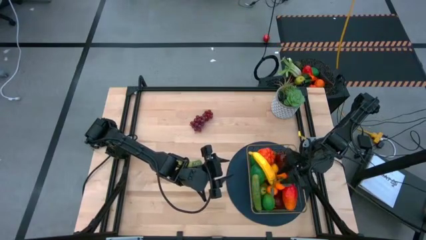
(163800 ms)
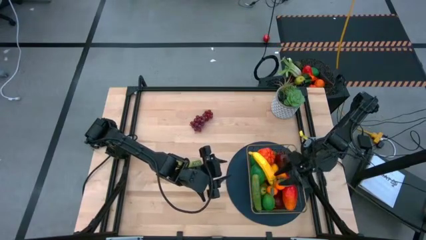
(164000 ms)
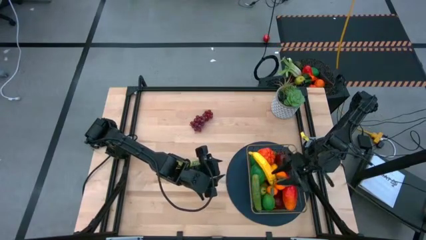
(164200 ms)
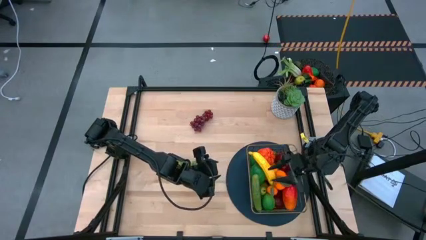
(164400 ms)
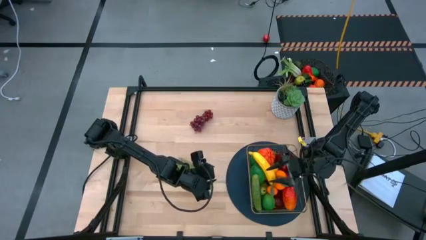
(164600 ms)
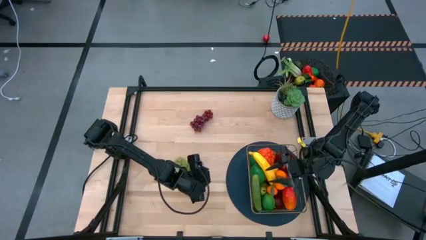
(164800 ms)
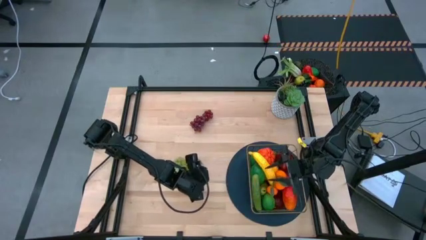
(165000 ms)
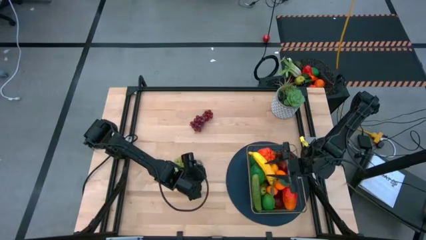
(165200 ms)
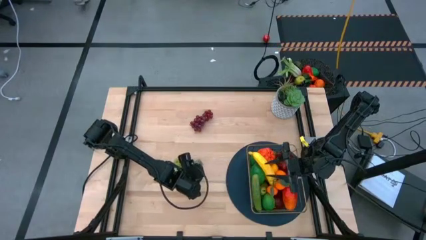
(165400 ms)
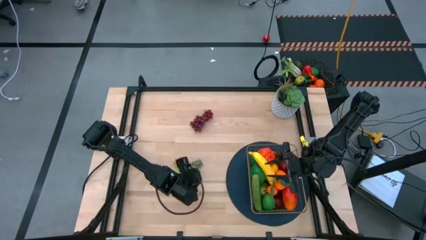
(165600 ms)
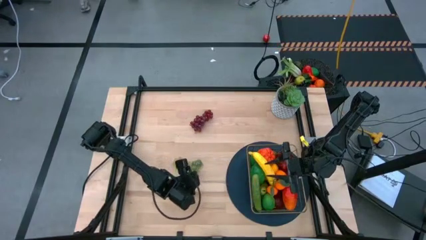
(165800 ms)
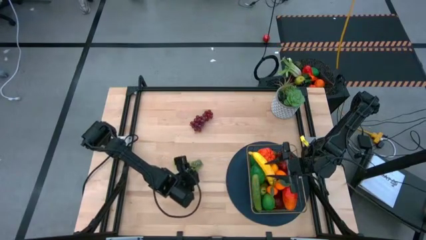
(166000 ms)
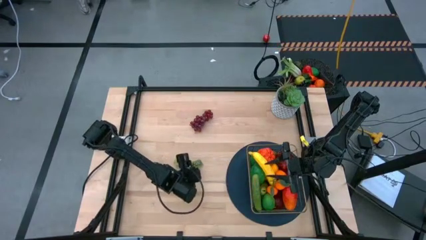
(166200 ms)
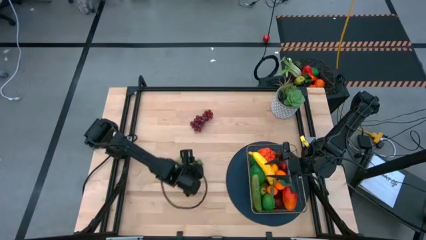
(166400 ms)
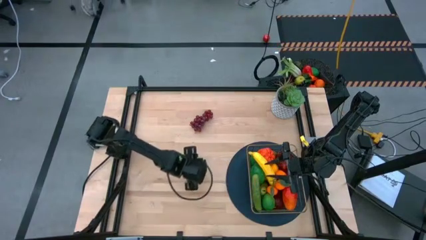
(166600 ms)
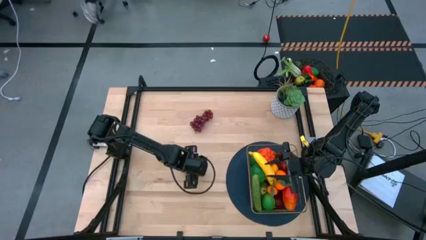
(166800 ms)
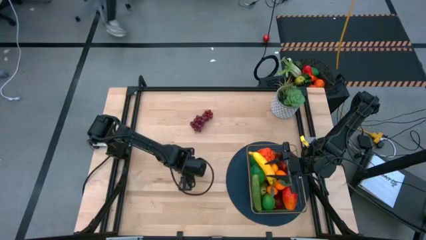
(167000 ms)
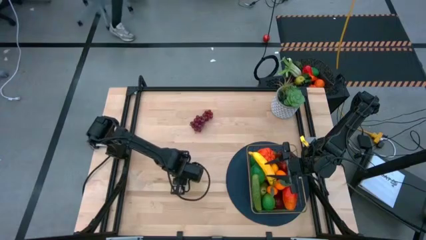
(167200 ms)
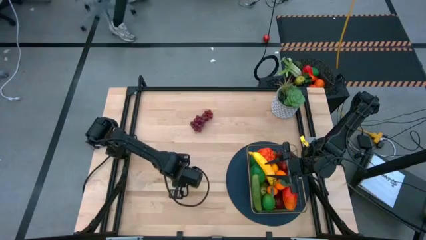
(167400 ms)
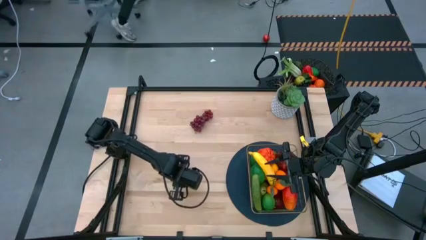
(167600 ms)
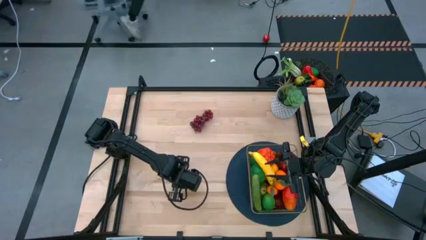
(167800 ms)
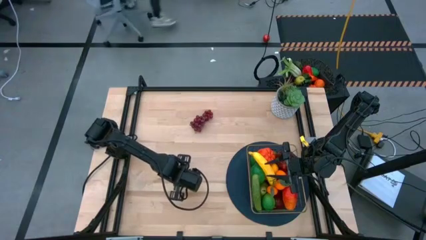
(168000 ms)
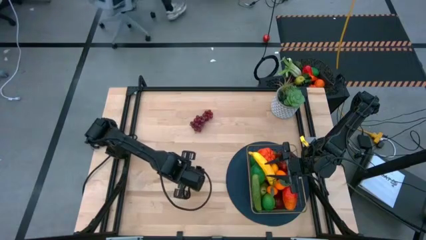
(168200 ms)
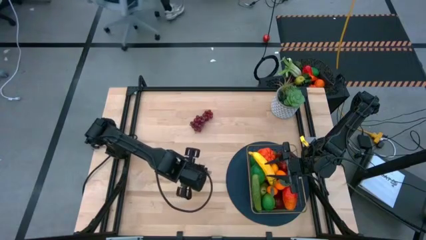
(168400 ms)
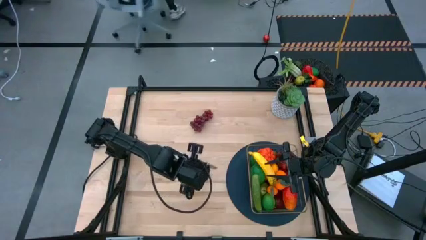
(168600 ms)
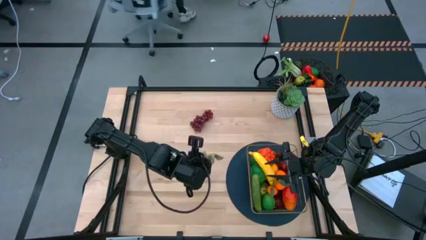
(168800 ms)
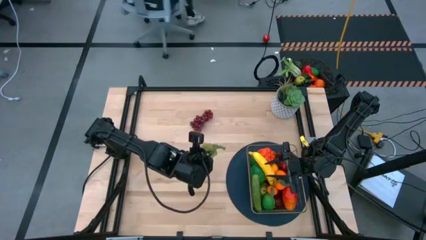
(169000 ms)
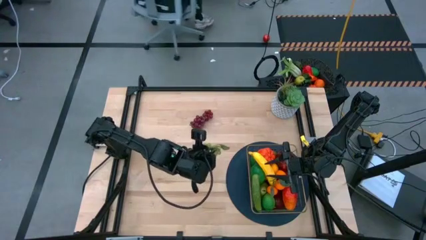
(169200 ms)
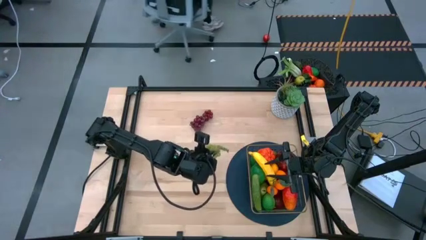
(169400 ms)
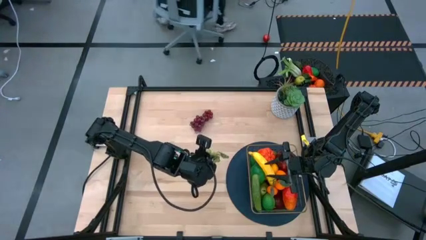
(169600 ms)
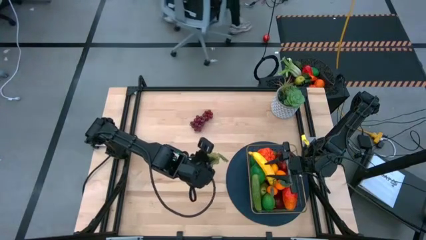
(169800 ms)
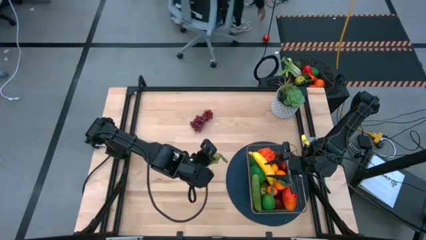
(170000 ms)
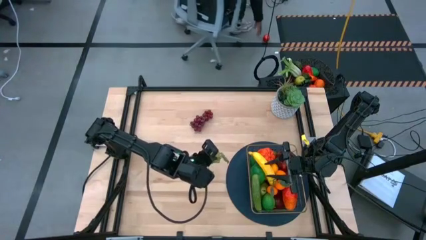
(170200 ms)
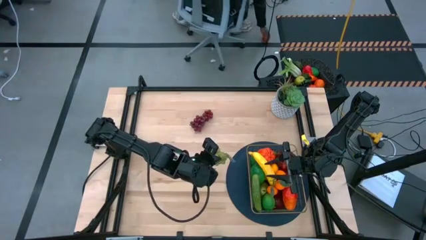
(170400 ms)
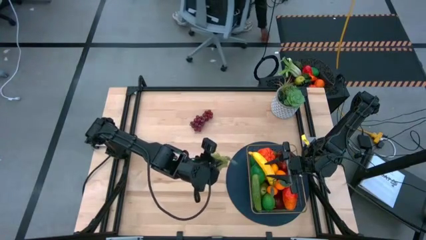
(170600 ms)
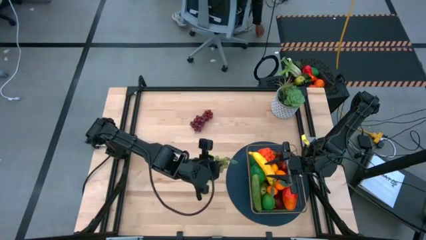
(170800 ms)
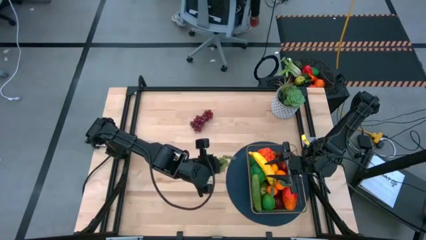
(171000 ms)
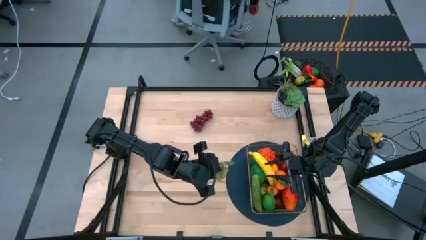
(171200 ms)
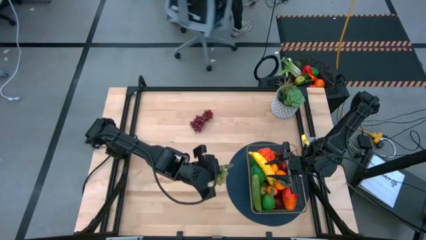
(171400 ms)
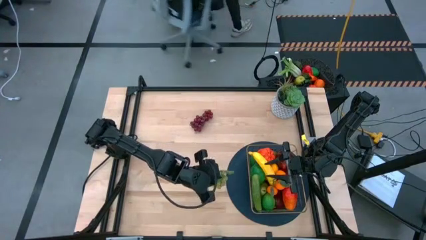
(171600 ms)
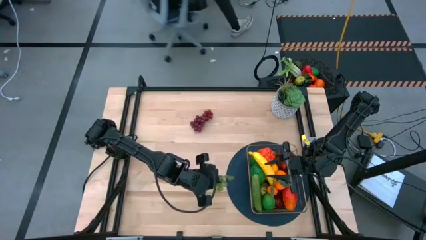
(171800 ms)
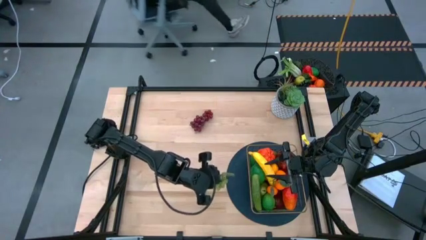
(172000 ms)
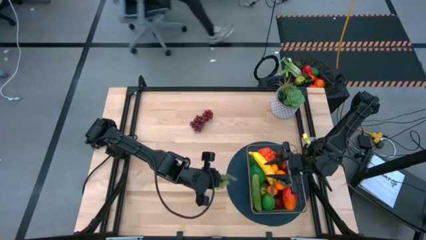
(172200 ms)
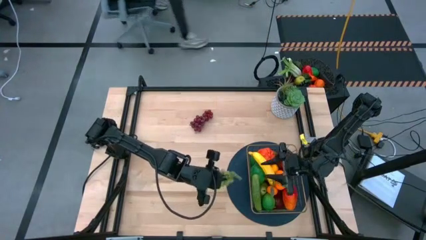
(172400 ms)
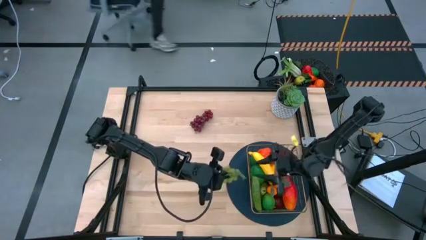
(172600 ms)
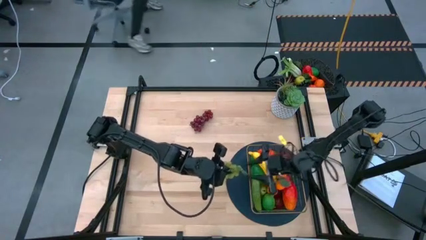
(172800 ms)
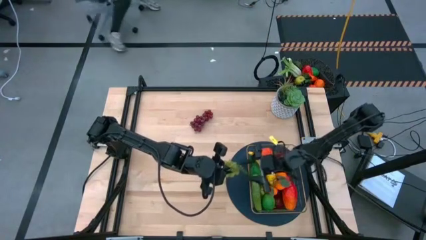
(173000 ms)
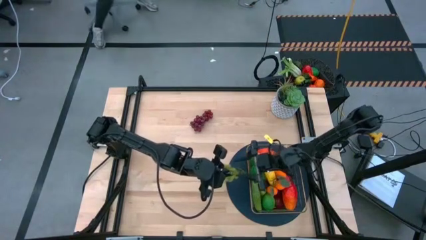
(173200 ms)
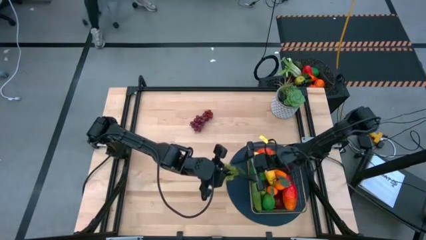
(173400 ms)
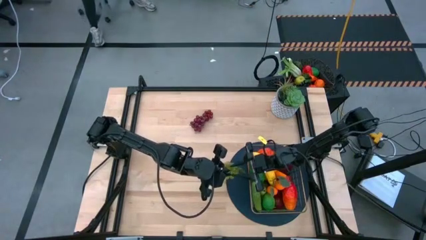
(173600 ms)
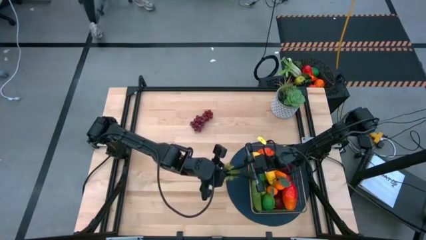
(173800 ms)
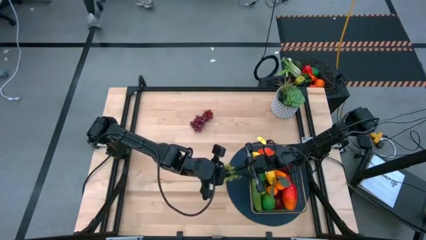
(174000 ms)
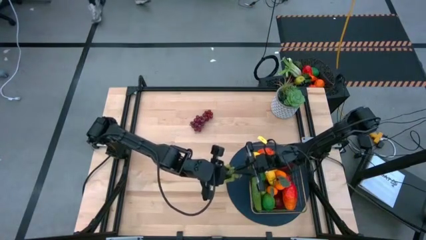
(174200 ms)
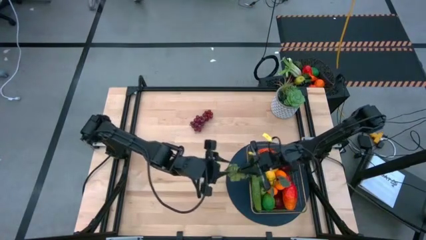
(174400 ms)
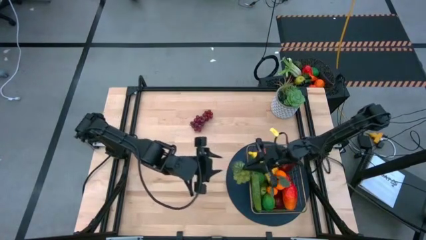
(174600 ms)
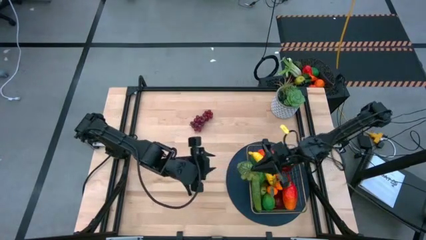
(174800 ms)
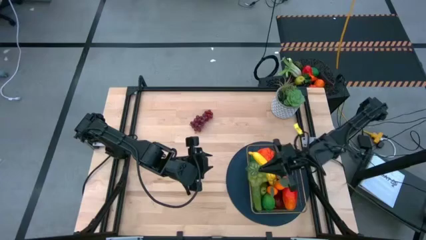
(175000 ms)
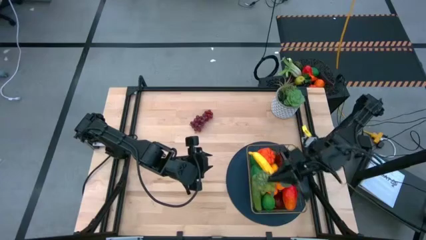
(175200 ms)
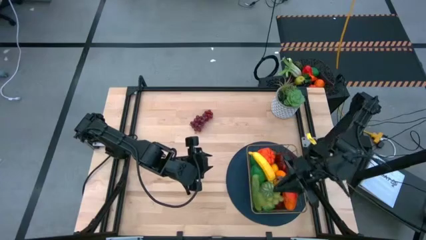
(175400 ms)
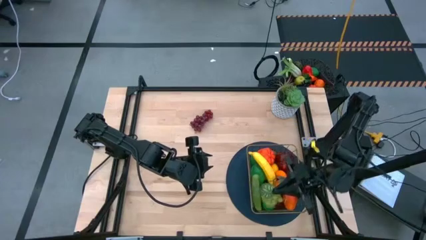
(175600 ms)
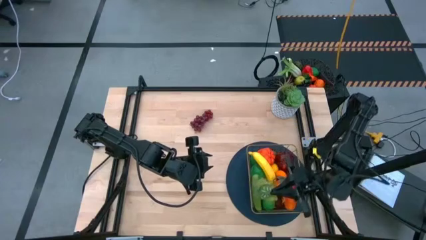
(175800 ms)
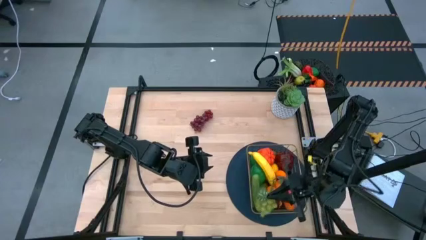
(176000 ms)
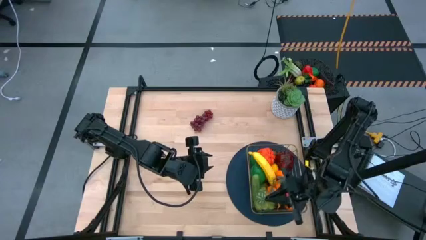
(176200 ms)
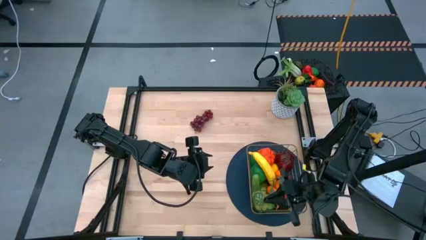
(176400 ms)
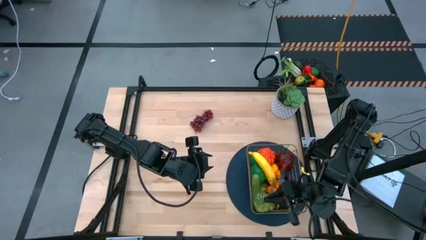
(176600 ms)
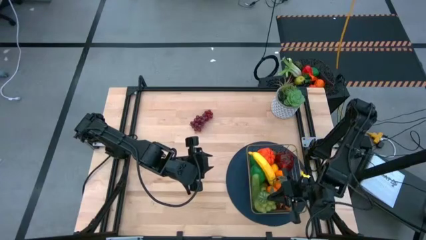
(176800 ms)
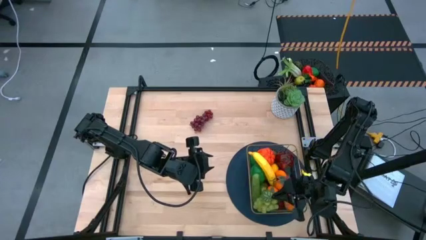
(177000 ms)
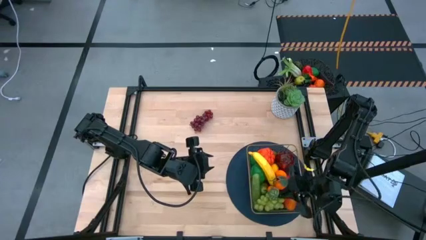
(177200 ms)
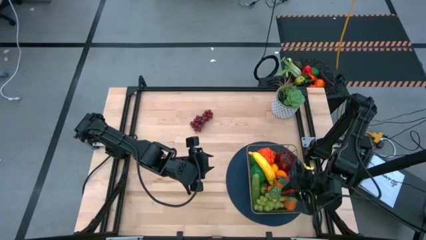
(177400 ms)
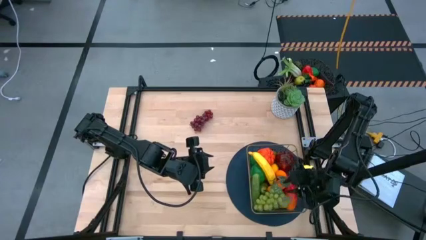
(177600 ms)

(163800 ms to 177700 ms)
Task: Build produce basket
Put the green grapes into the wire basket

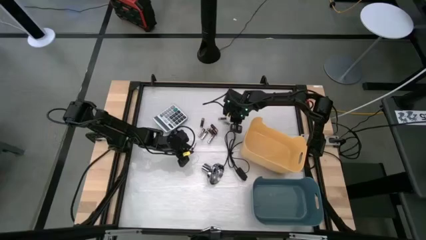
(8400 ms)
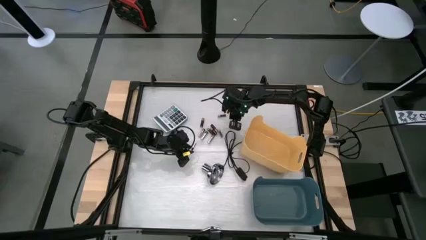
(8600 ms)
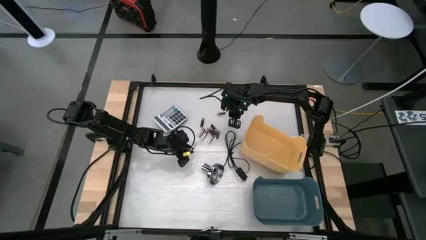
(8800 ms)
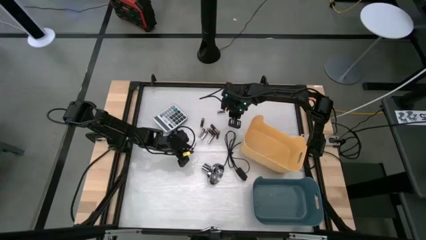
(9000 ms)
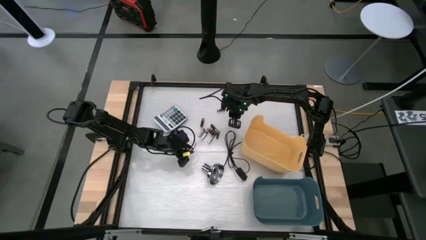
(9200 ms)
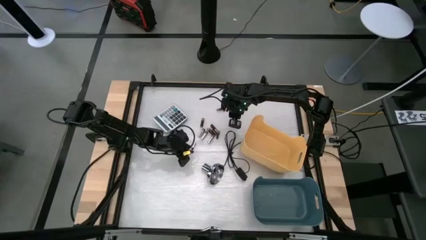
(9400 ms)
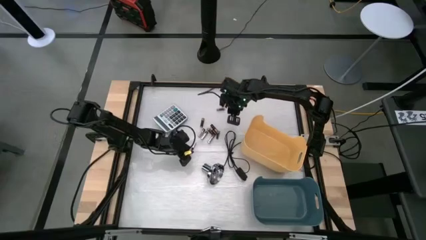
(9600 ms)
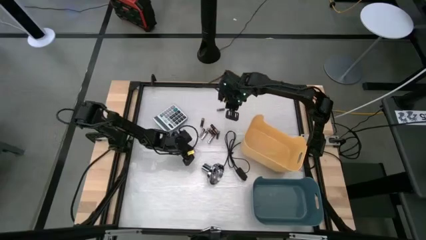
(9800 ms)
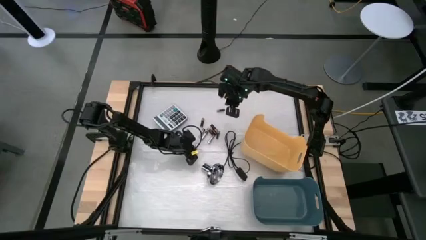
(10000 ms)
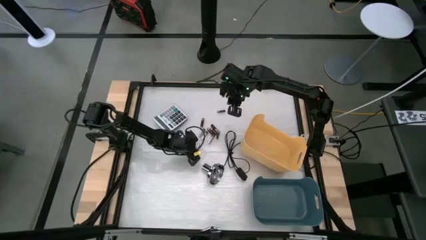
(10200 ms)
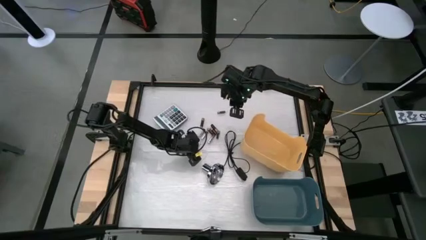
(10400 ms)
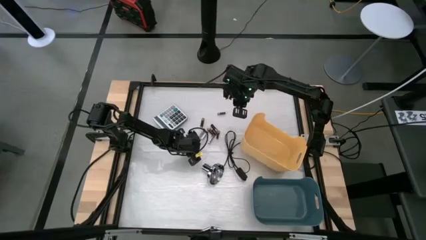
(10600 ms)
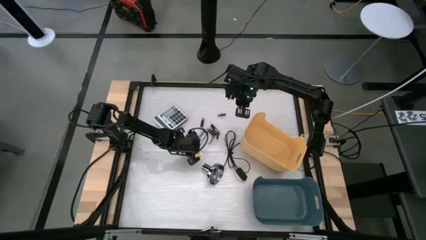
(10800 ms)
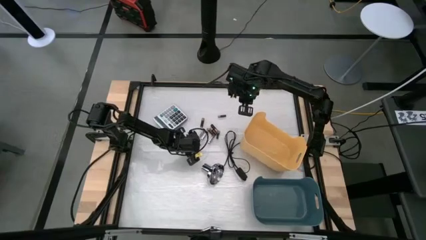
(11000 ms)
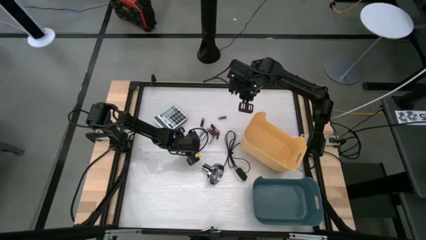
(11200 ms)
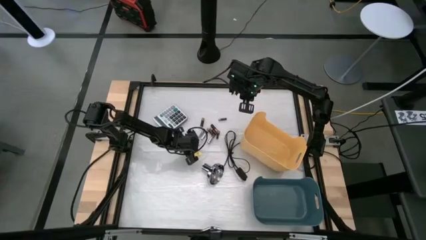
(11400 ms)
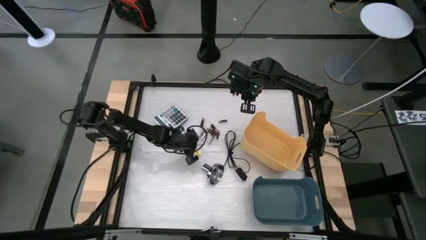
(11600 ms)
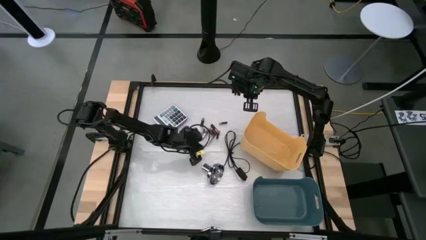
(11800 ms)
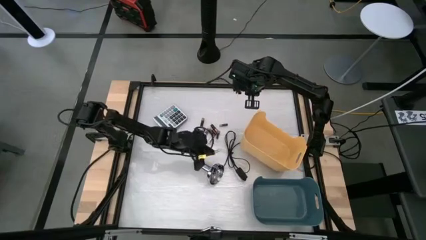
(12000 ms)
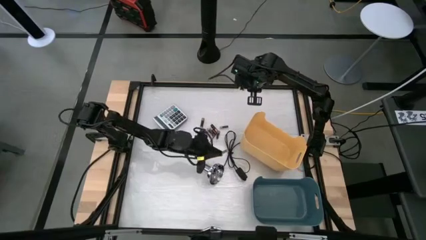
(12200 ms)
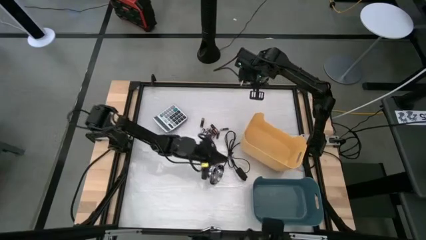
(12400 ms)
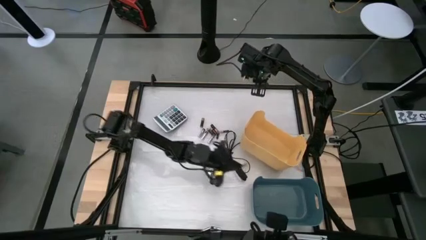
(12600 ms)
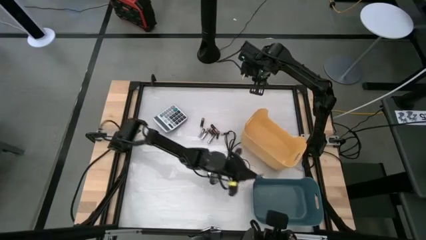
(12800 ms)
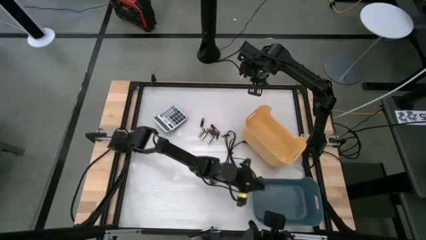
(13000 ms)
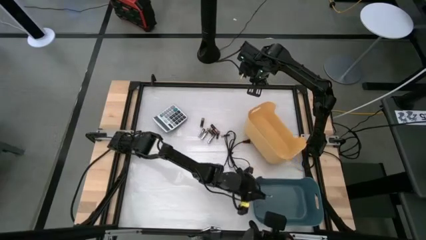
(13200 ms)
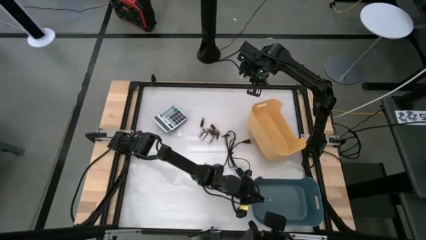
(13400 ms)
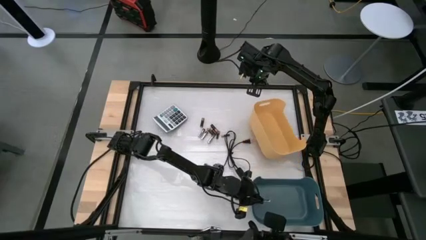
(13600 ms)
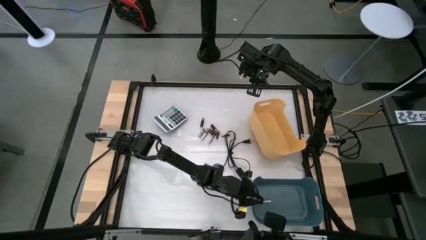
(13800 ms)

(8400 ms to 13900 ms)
Task: Sort batteries
Put the white battery into the blue bin
